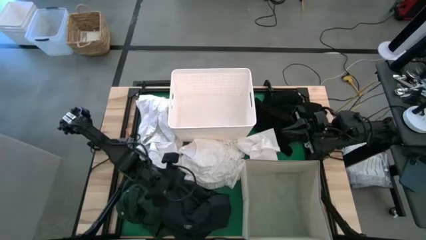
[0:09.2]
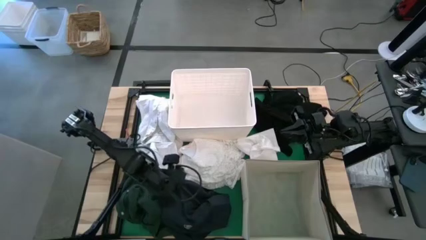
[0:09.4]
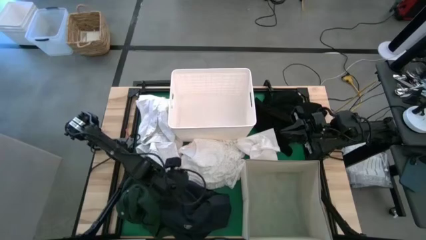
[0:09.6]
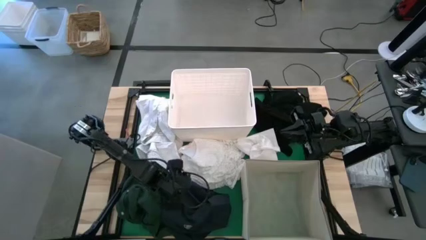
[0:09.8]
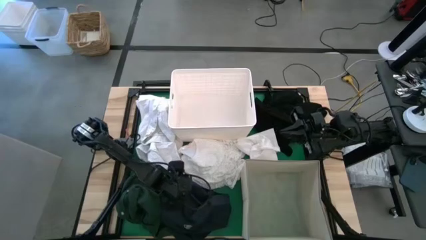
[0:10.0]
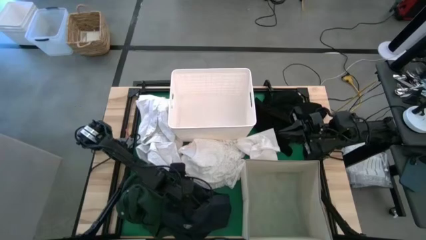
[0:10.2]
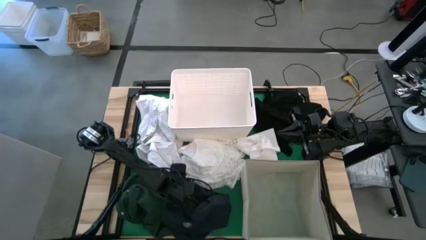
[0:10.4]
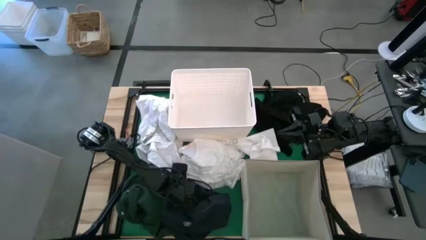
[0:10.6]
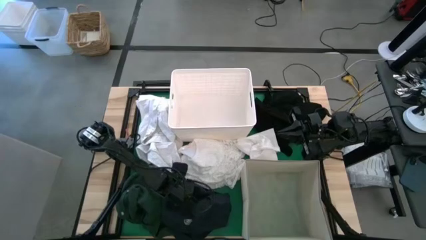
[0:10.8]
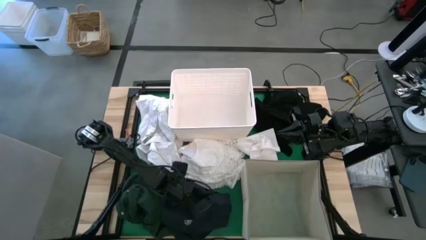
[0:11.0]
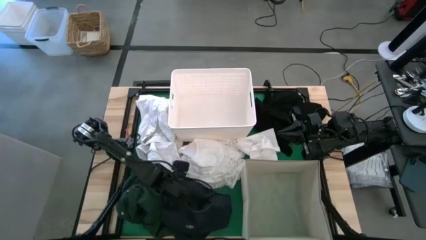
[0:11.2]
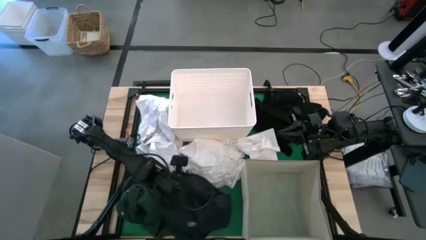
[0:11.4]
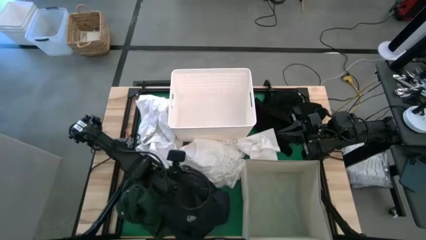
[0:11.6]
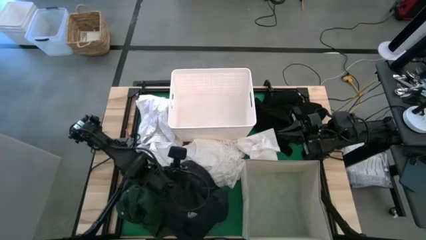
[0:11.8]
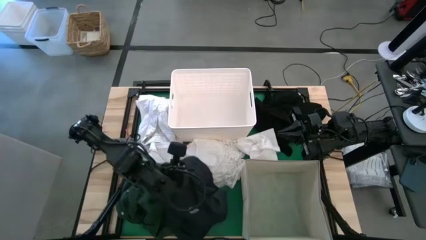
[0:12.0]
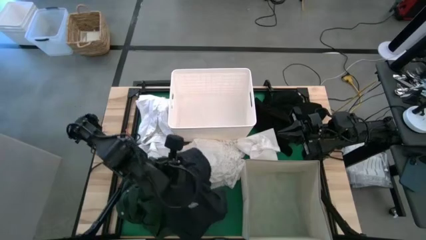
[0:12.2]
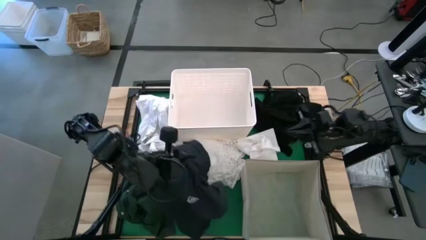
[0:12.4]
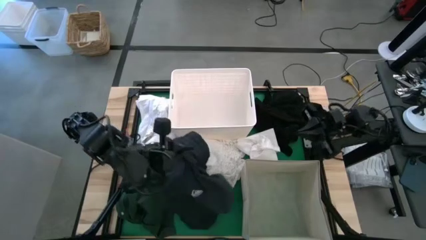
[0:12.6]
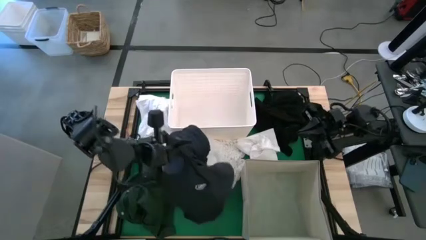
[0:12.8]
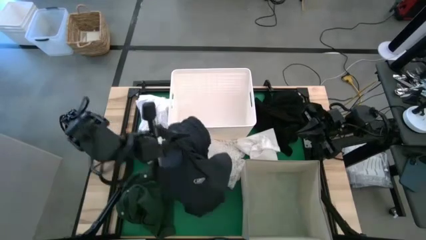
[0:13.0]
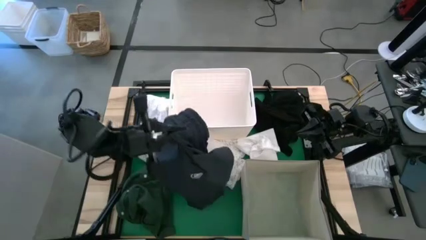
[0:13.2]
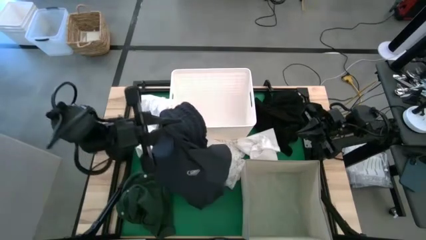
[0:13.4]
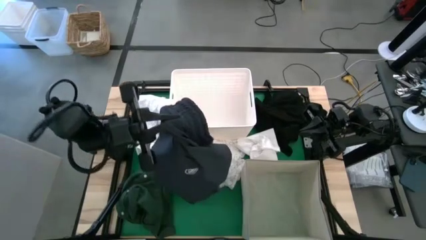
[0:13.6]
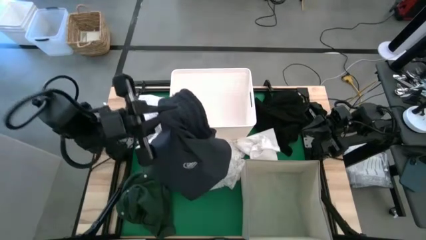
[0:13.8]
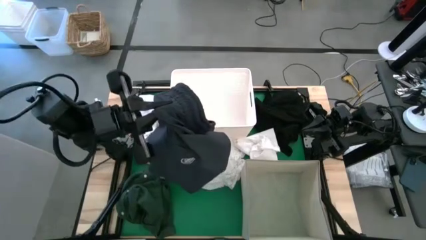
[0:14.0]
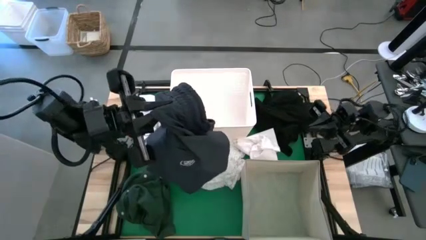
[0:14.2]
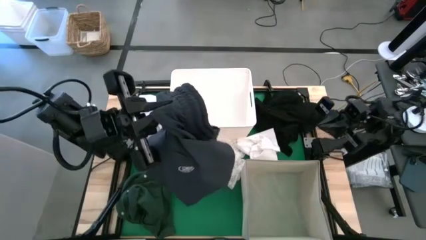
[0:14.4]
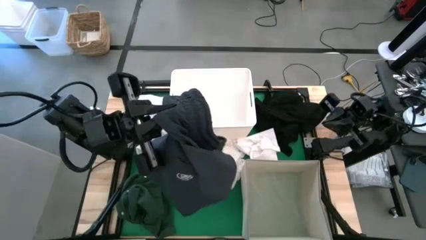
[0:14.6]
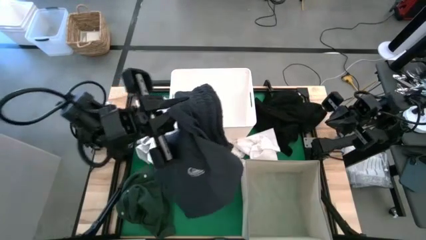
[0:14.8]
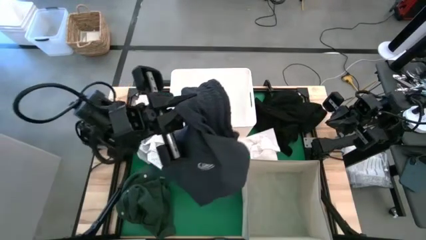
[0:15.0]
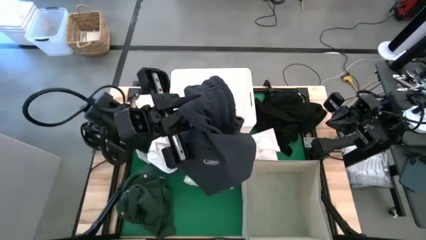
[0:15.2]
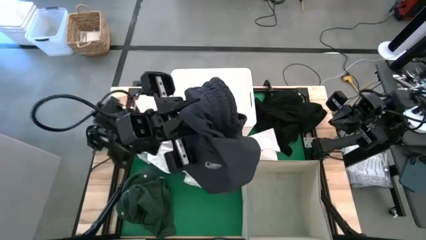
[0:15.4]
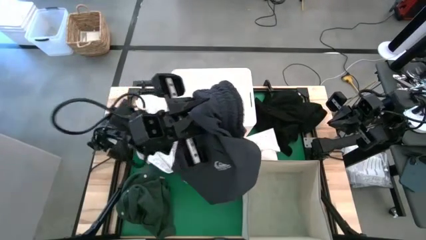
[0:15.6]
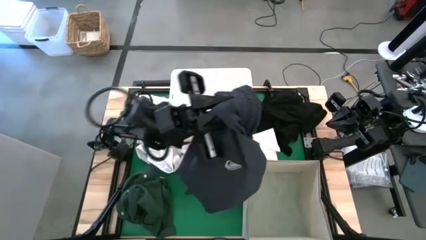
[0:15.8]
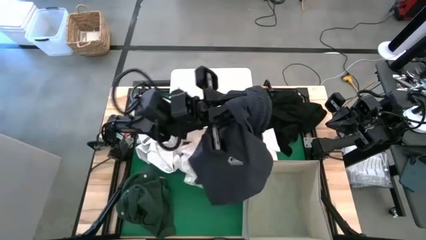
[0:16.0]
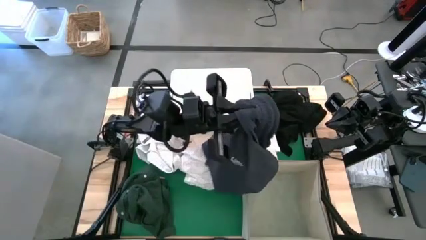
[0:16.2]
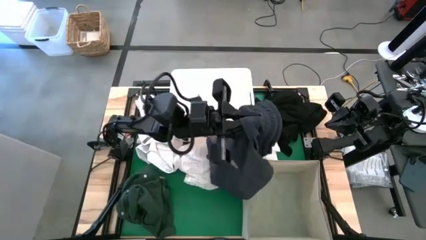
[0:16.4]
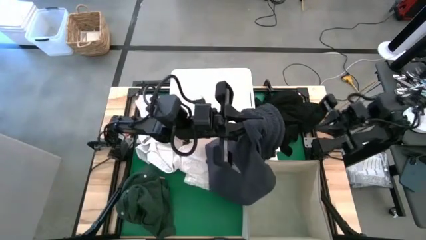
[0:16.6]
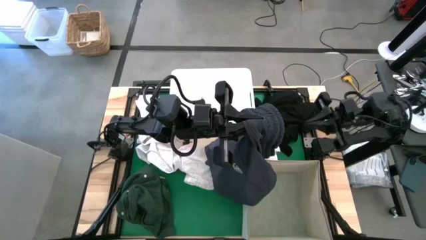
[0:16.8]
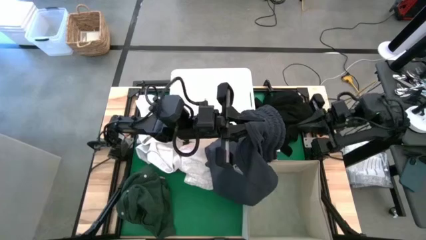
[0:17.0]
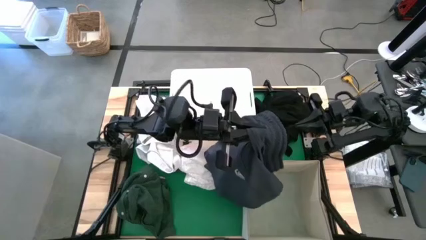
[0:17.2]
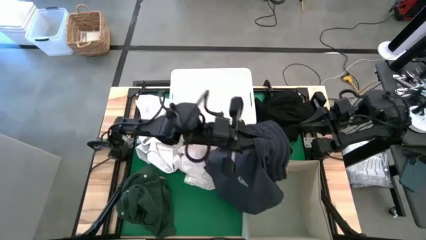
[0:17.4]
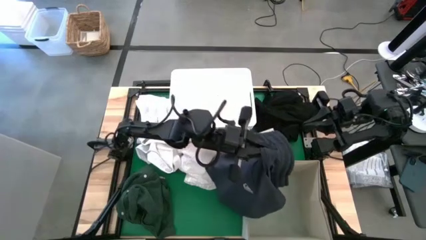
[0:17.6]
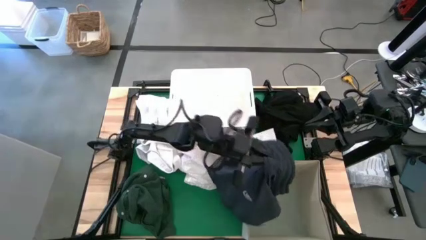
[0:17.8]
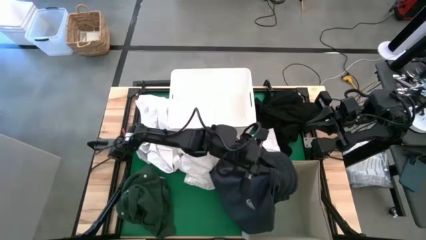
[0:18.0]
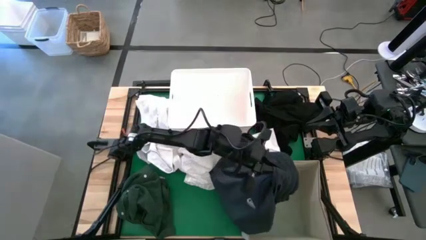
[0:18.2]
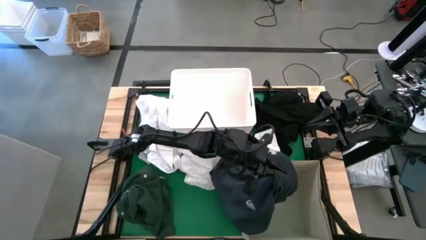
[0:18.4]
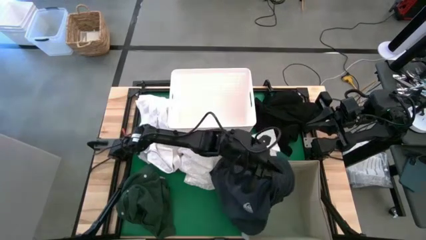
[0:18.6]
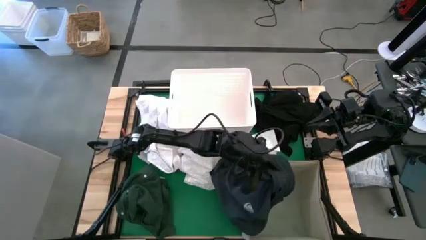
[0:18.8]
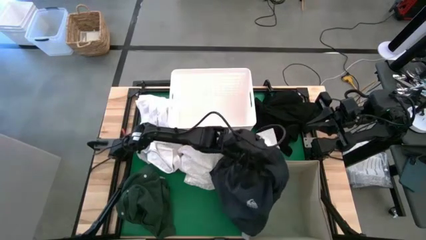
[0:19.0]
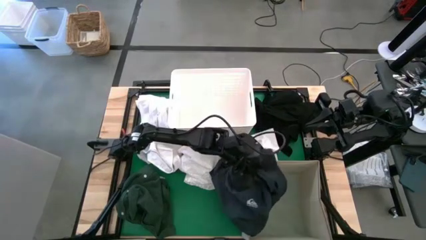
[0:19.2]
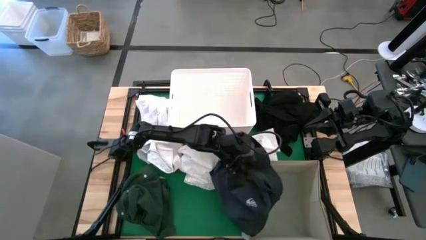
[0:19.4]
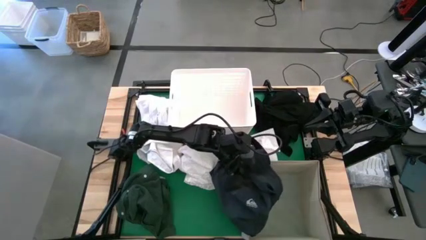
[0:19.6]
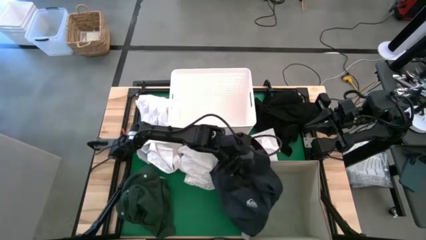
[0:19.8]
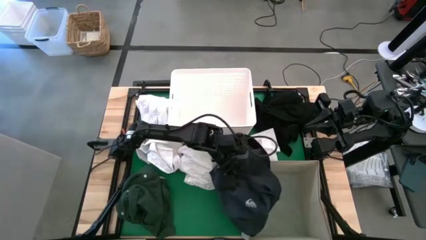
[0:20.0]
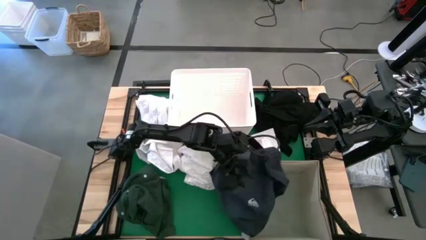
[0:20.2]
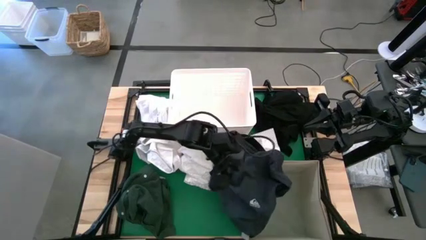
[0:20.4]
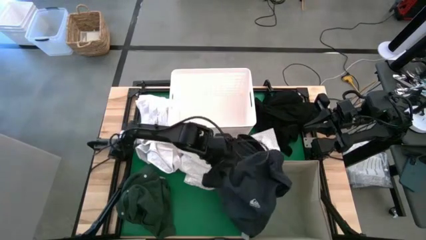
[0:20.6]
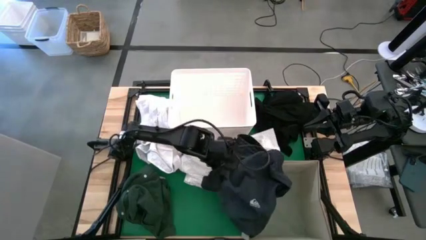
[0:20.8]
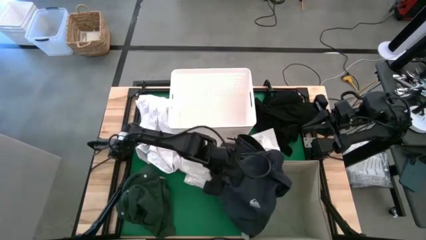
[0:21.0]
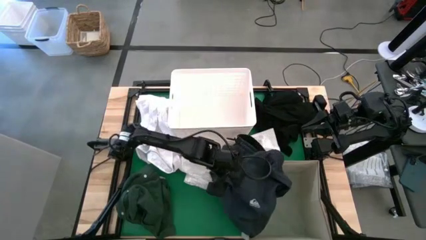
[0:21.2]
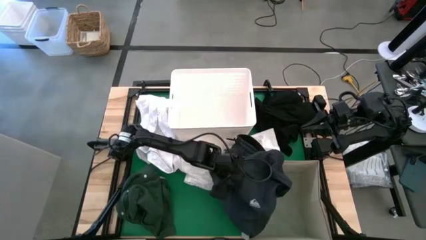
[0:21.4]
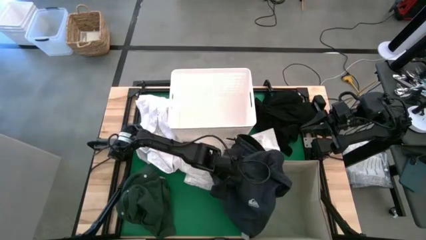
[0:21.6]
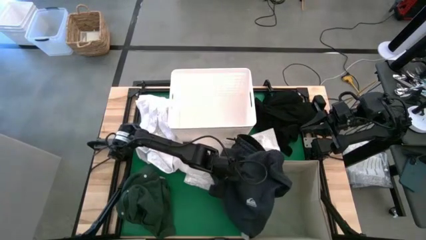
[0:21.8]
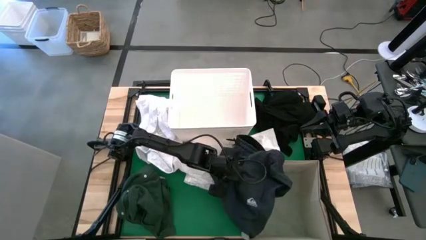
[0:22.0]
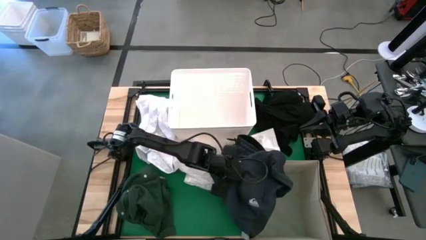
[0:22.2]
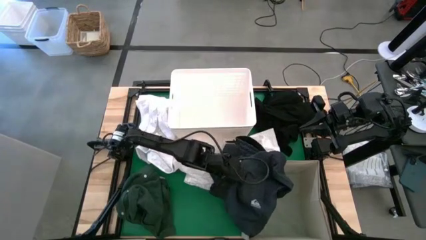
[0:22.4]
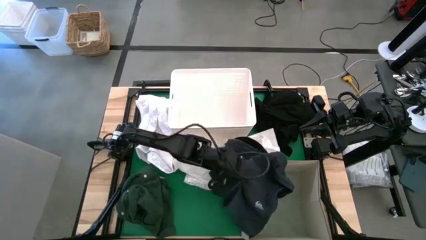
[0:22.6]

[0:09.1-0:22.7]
Put the black shorts into the white fabric storage bin
